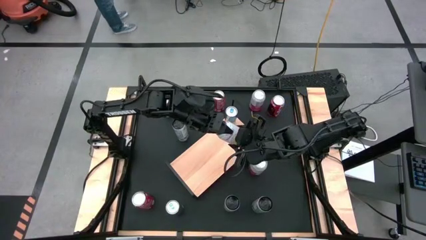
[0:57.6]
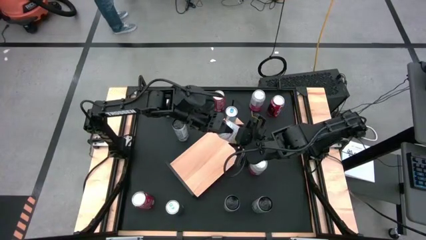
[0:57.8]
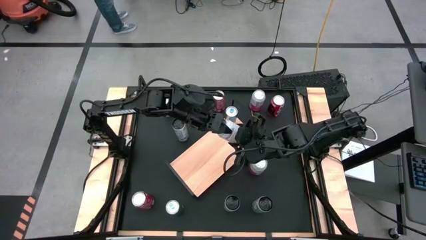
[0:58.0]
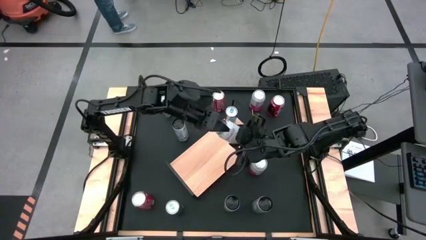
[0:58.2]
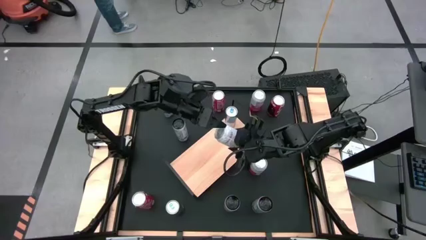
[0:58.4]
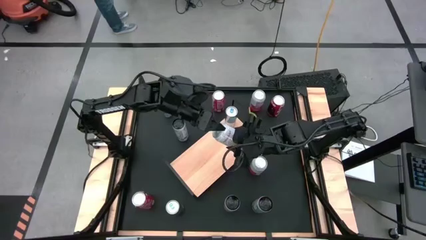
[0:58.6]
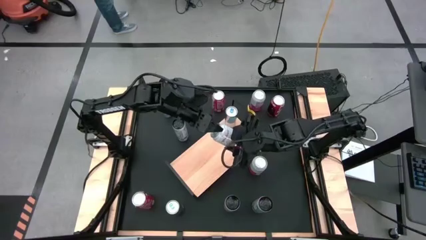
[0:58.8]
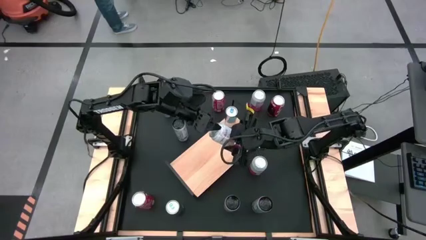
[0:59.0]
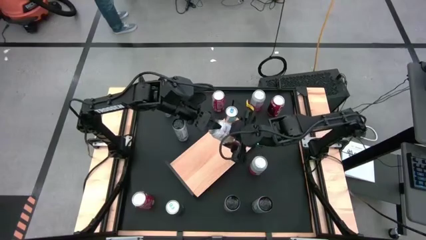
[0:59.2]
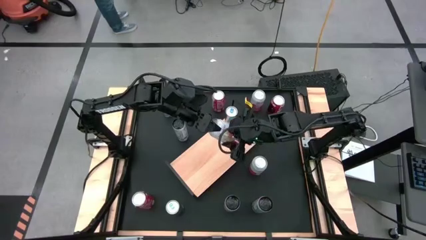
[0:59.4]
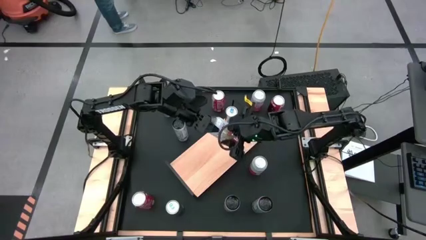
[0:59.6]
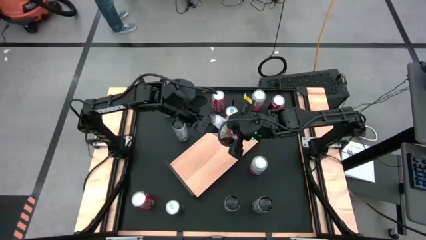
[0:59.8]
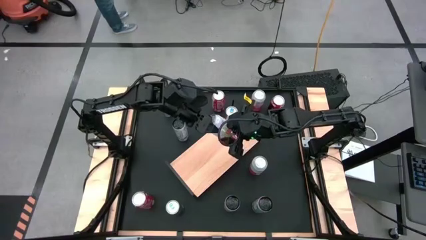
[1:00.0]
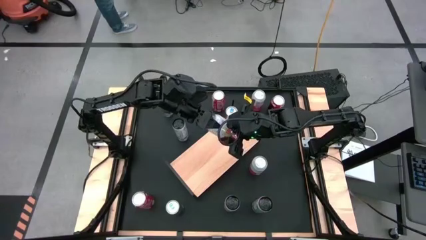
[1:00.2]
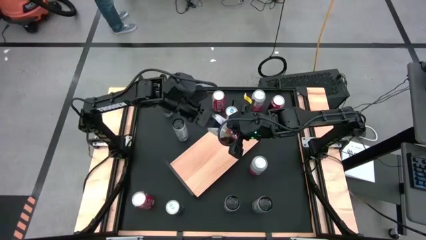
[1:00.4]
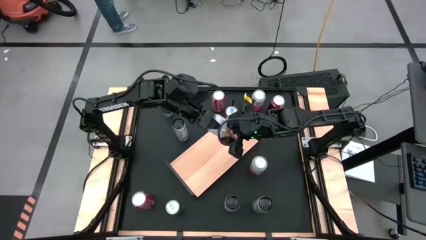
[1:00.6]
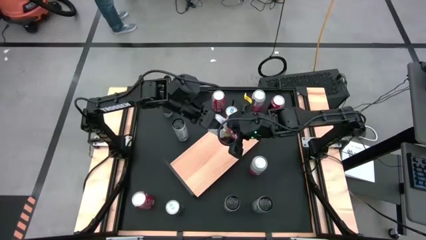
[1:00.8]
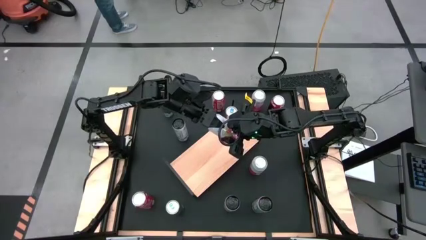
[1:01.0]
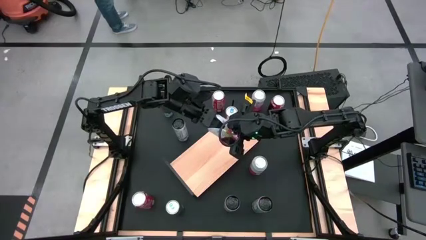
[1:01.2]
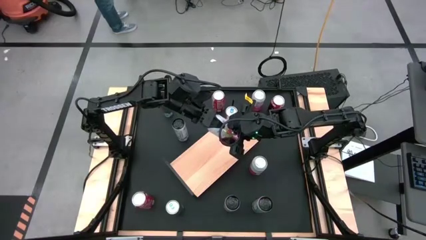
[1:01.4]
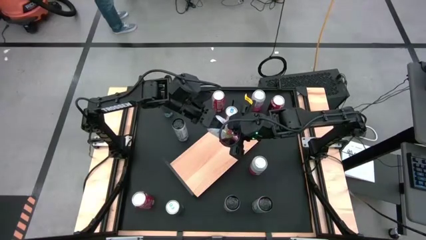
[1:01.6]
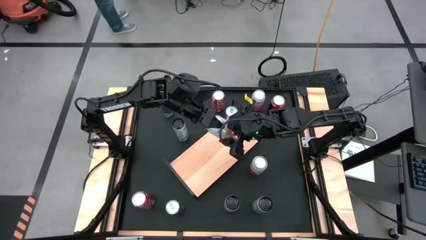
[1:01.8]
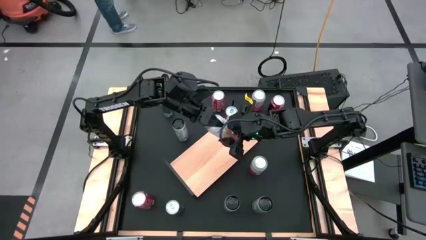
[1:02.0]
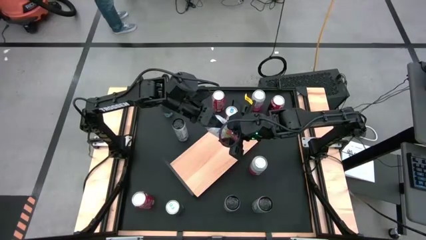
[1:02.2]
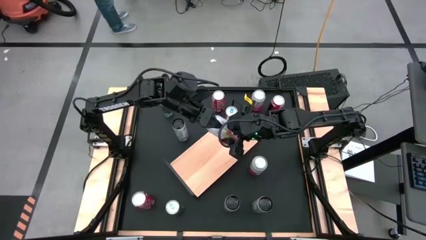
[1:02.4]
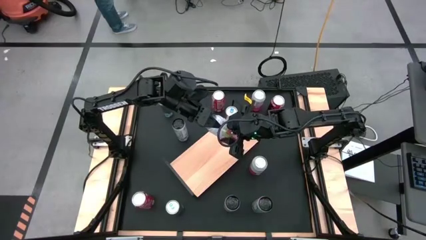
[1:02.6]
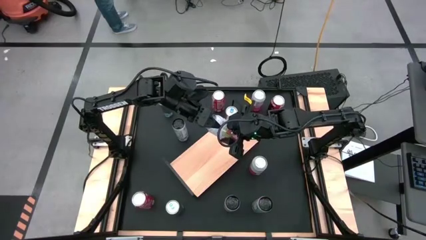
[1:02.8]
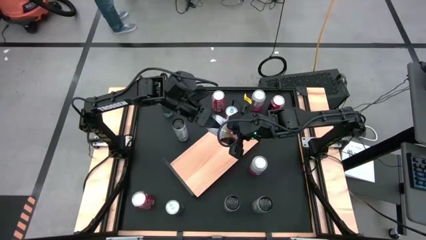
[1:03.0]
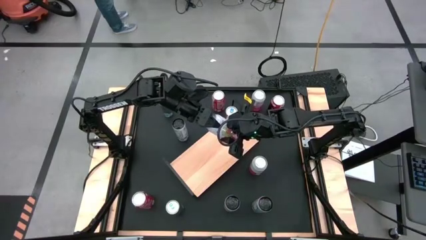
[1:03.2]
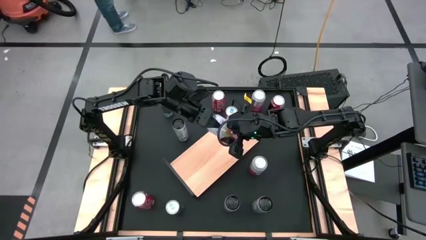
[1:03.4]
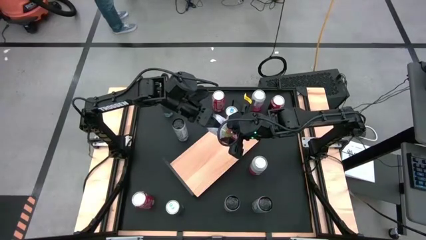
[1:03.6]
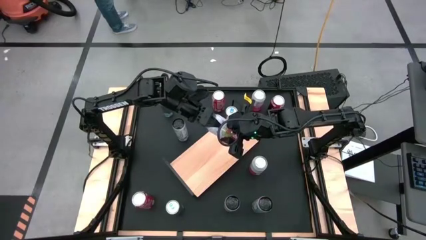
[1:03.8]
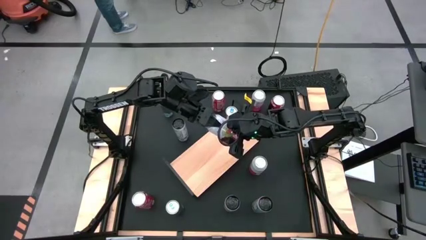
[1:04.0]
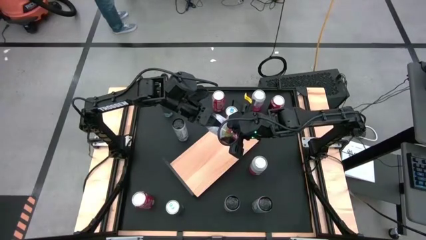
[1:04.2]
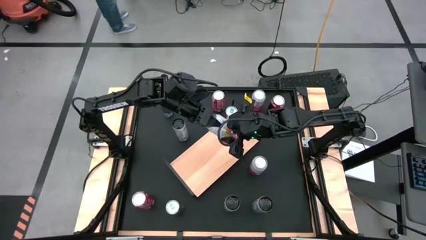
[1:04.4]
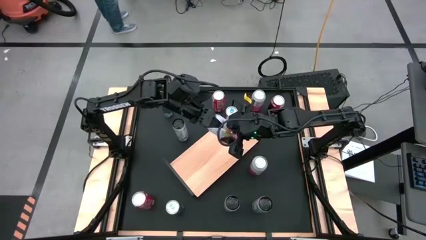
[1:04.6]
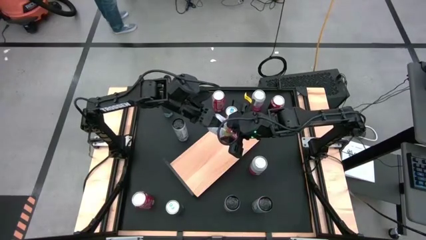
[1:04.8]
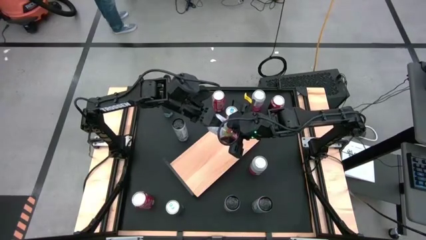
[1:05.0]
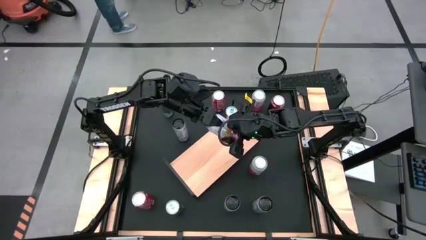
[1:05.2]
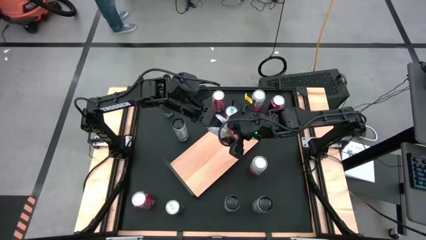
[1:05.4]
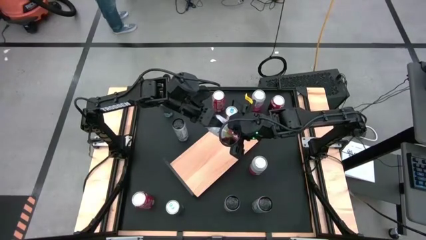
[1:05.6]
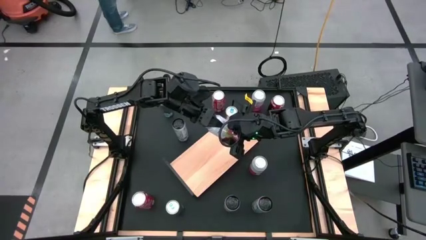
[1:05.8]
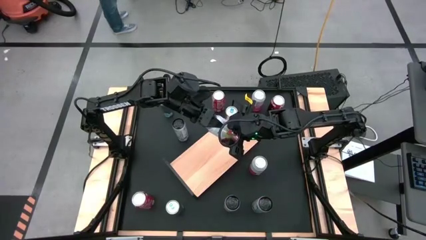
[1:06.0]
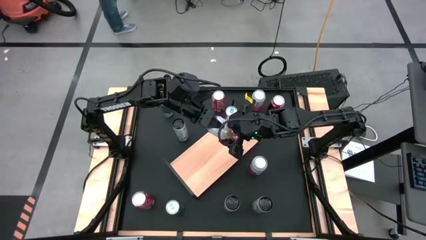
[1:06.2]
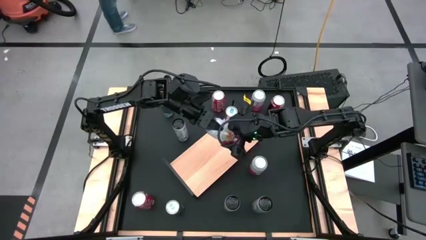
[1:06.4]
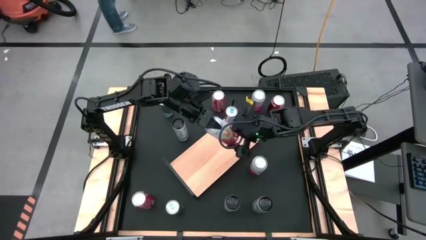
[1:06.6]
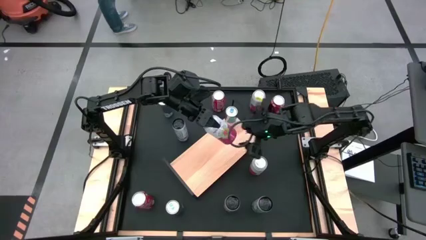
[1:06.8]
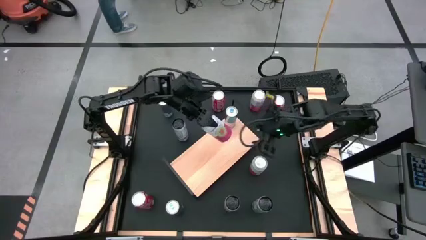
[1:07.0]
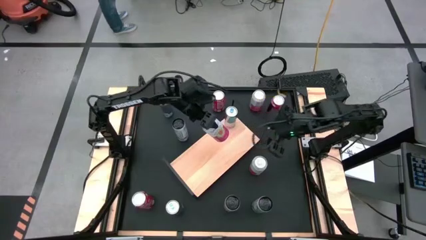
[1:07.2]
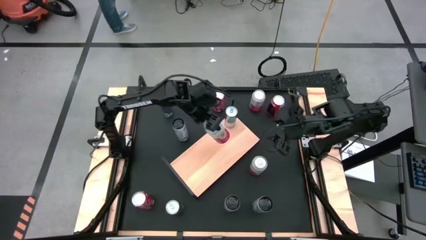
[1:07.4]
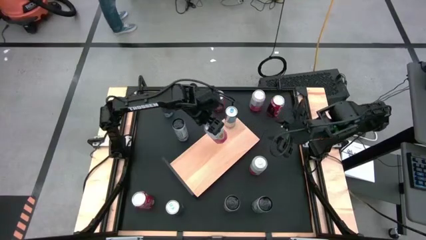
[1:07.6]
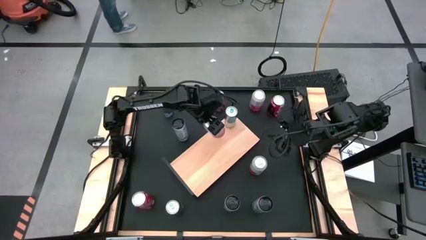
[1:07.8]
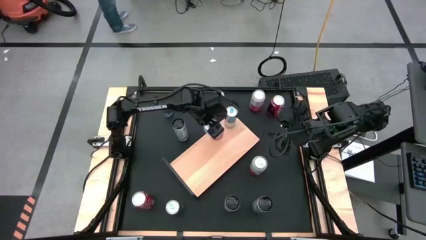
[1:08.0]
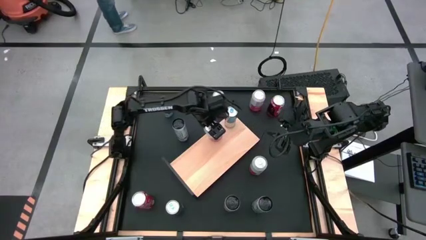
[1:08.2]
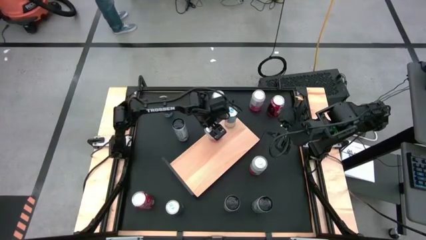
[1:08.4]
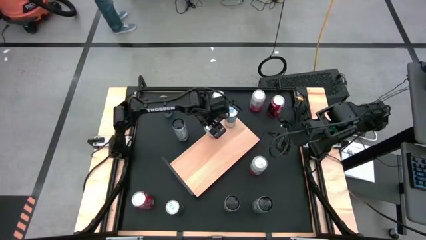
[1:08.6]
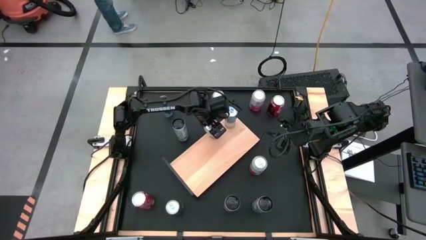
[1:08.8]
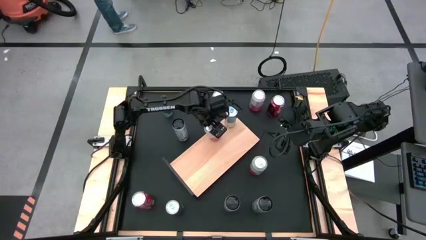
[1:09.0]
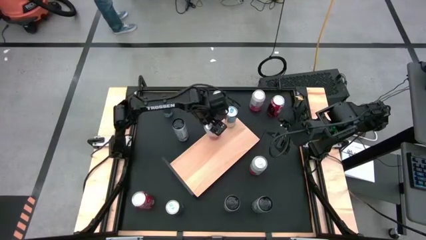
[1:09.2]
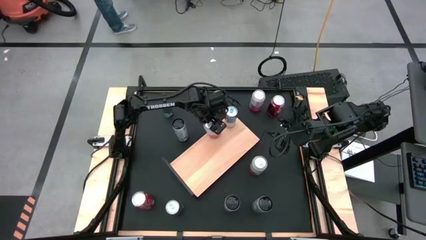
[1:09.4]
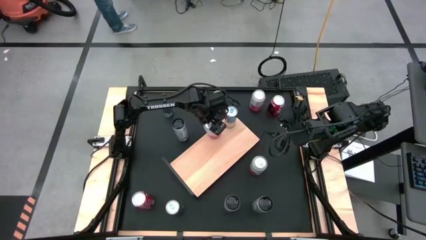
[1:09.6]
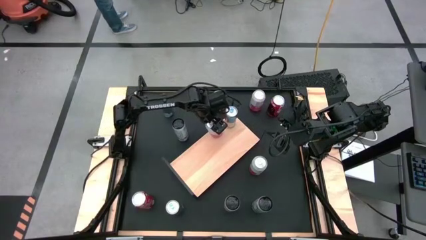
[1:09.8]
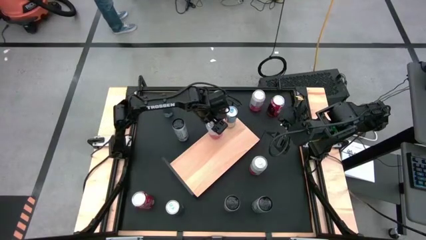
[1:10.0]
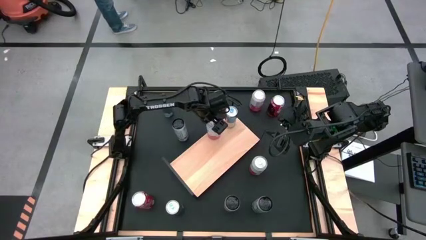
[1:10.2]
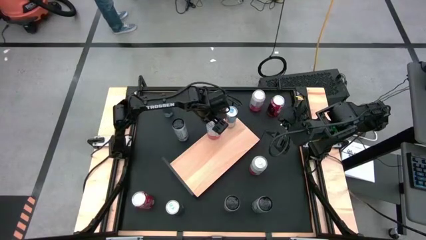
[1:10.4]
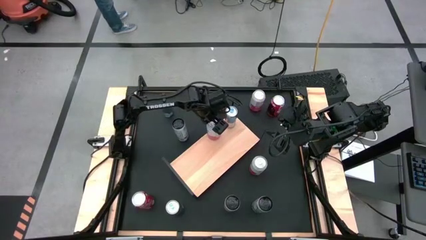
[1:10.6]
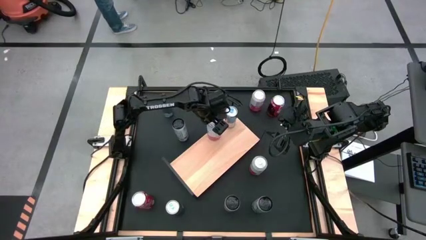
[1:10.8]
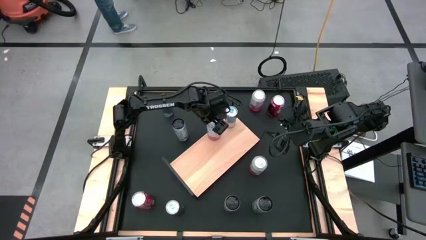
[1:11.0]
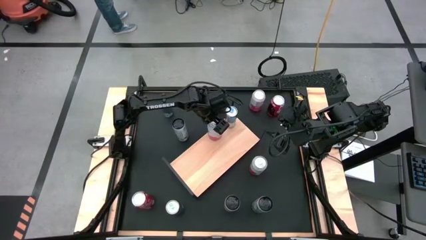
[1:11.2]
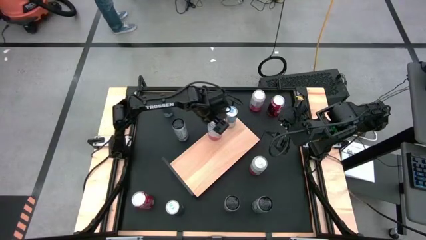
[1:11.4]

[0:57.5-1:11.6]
Task: Place canned beverage on shelf
Put the top left pink soda can on the shelf

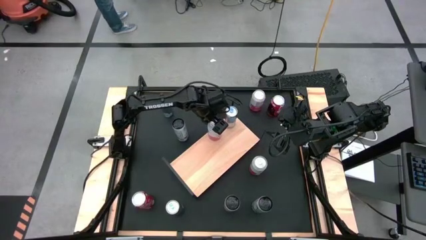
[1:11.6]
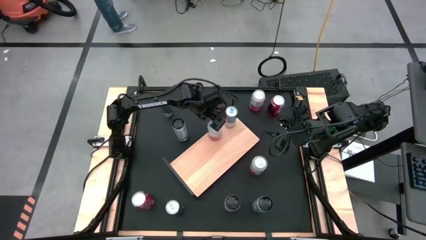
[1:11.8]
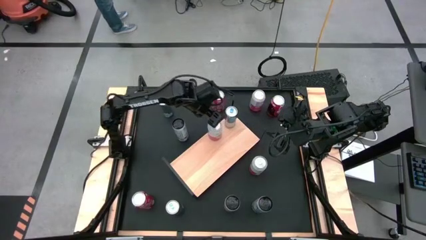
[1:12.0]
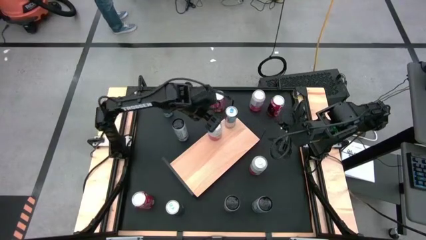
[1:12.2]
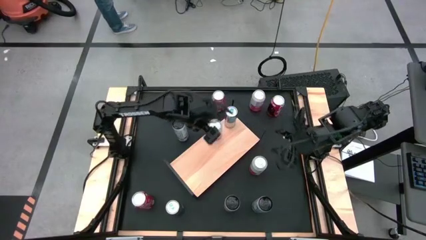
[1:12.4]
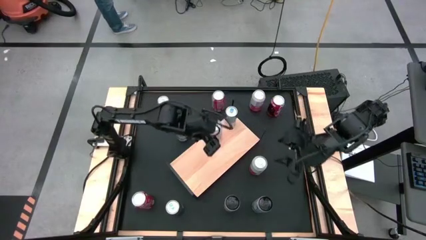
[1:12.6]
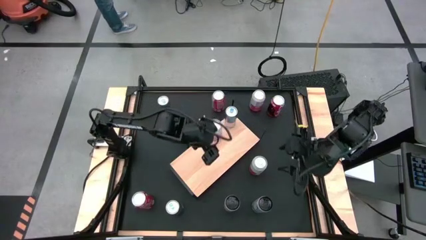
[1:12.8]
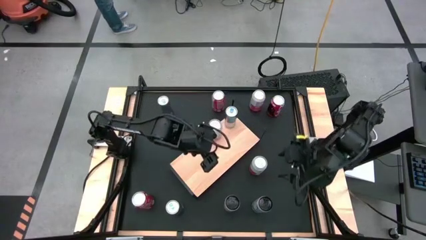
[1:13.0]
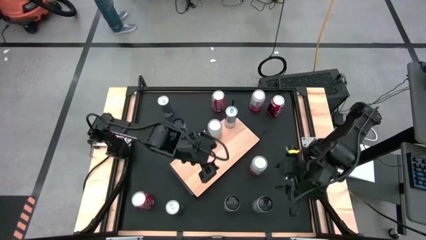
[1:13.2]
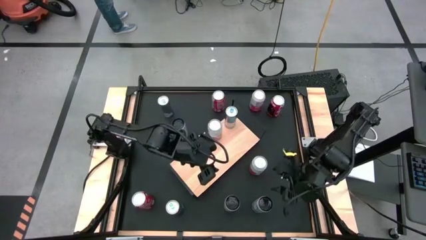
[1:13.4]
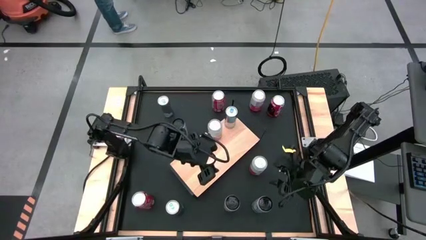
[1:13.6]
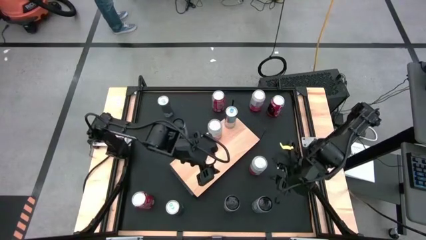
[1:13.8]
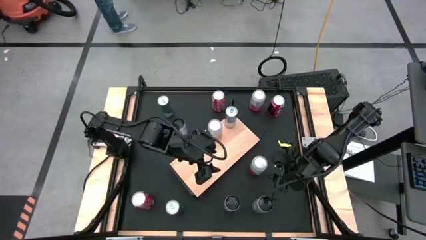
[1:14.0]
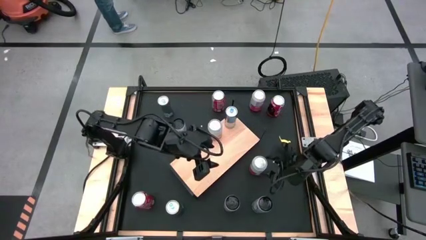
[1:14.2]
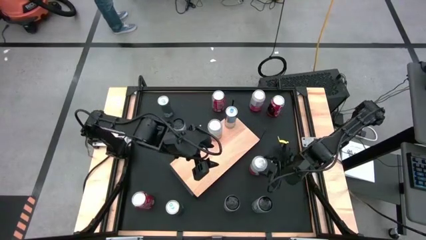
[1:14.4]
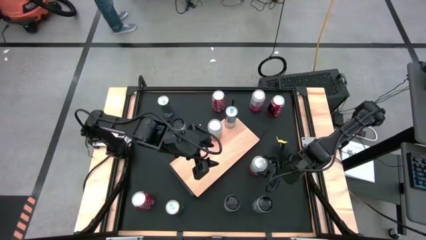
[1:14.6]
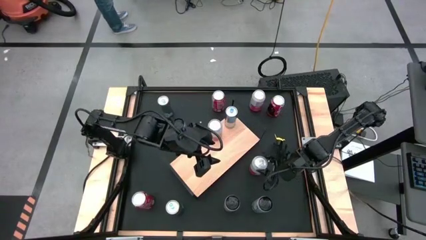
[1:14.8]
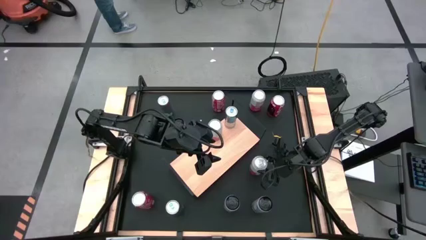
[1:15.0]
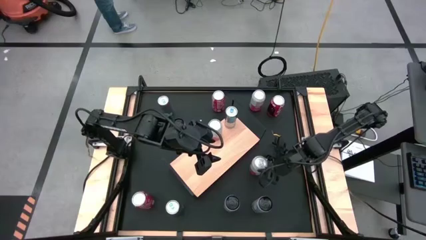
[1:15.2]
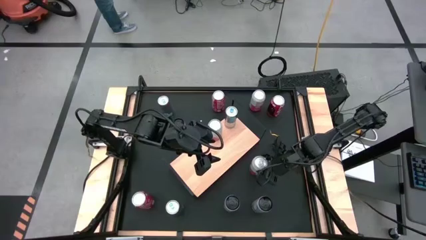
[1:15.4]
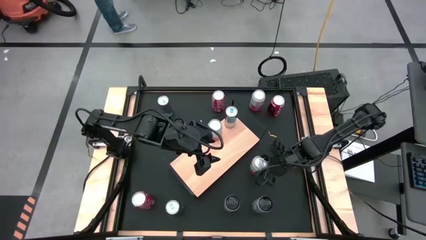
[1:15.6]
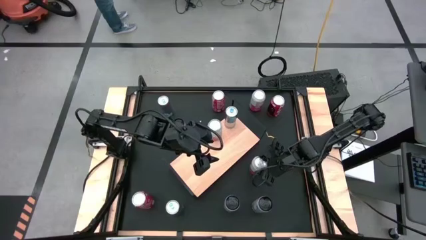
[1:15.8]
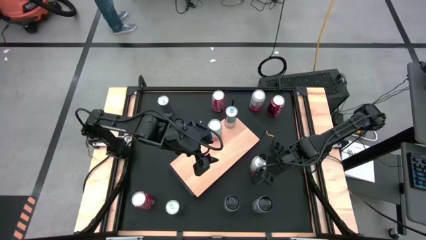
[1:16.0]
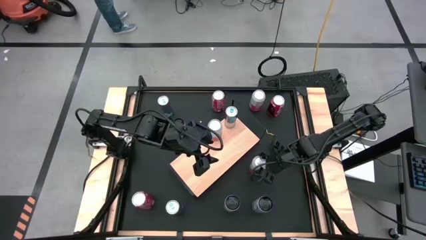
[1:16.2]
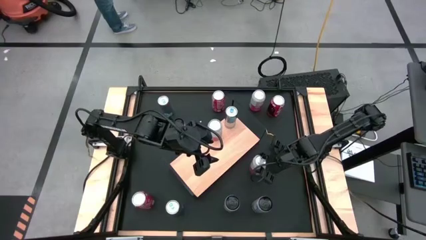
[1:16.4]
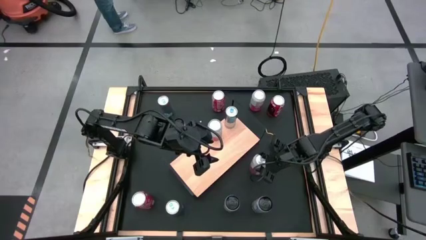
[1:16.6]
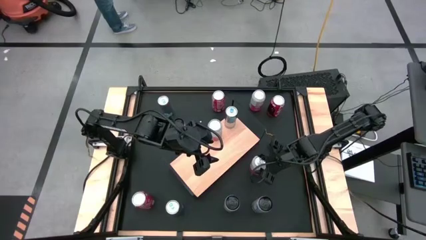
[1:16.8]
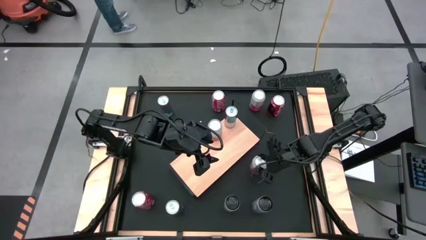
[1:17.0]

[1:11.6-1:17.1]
Put the bottom pink soda can on the shelf aligned with the other pink soda can
